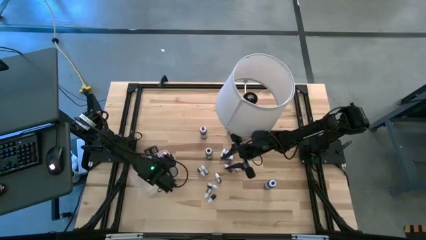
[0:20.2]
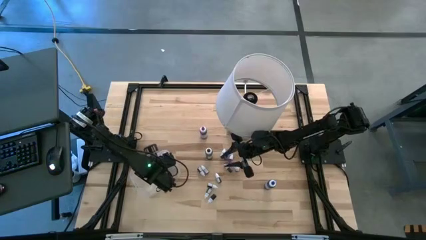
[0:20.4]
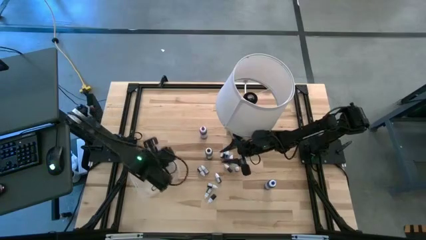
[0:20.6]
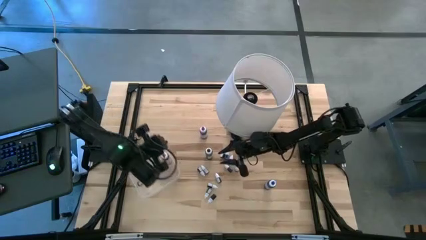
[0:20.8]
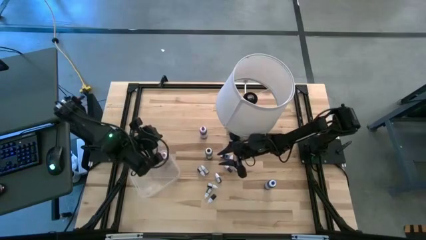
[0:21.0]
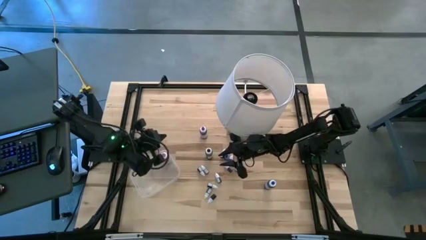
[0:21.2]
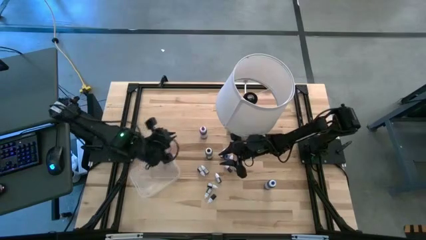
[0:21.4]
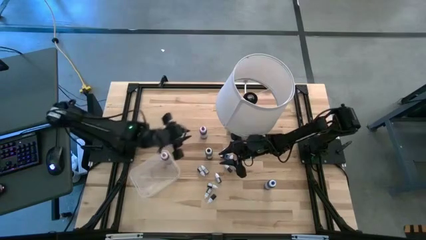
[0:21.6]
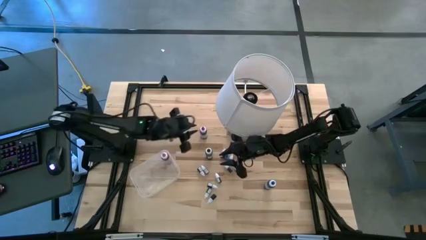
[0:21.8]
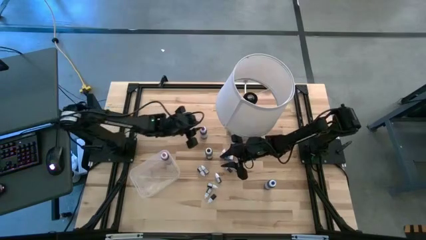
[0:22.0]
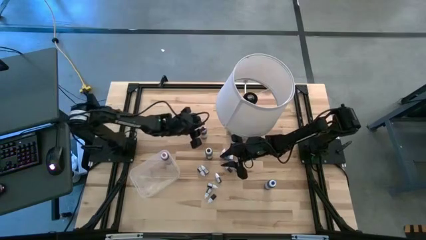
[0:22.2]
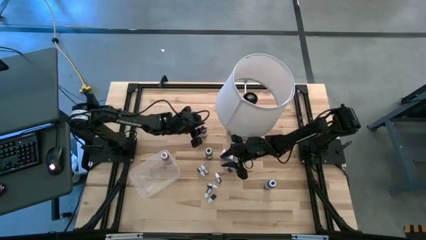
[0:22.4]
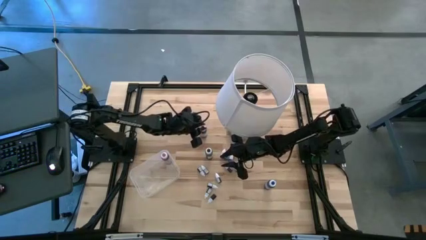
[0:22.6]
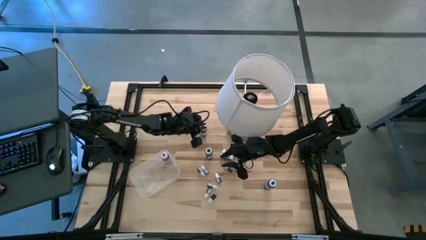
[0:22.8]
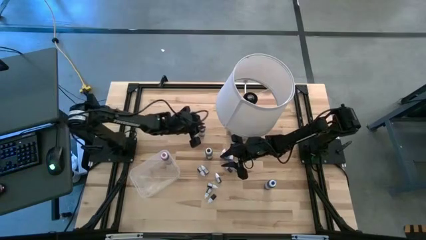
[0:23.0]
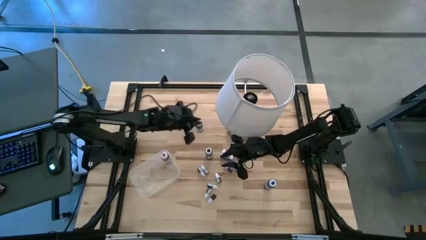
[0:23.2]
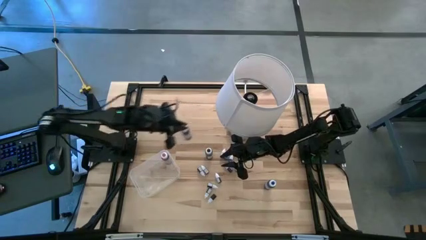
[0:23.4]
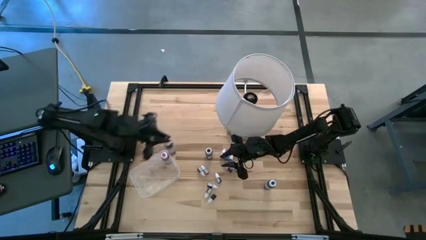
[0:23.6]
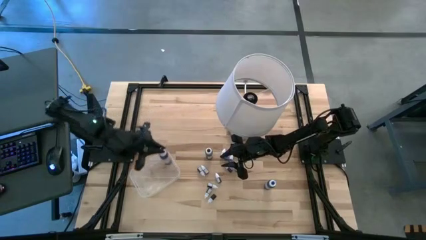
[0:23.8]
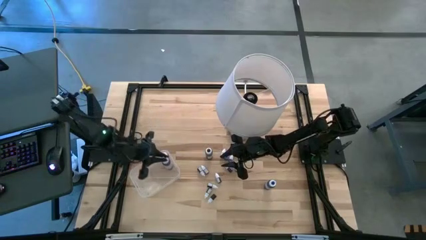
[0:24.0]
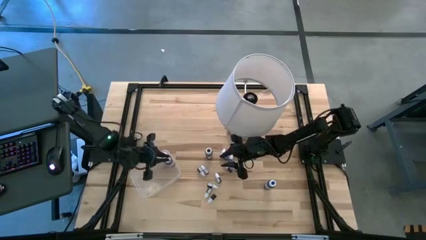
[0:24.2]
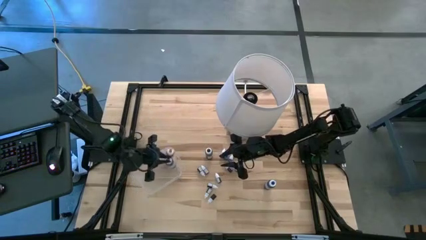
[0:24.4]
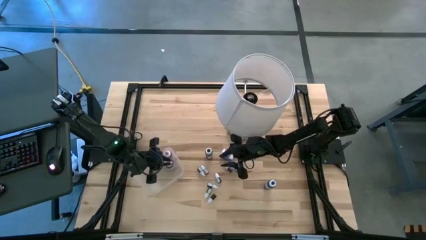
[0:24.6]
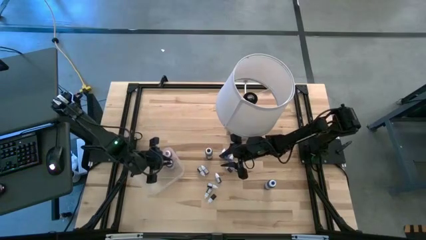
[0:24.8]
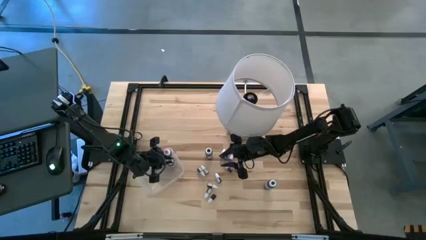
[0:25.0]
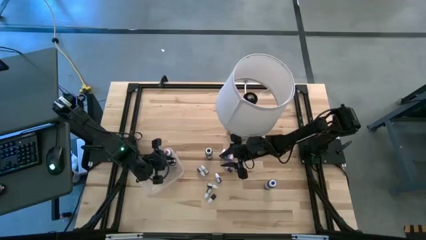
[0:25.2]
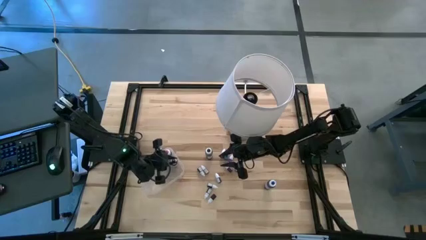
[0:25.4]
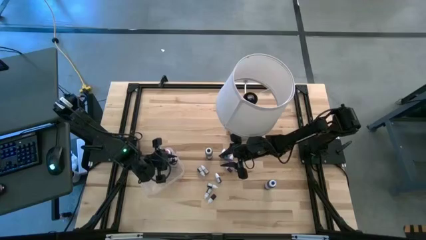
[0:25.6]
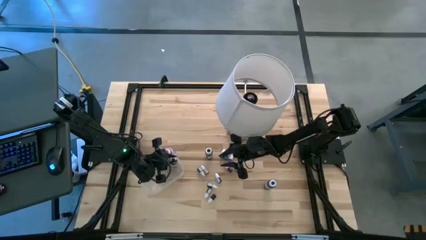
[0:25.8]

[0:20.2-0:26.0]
Task: Pick & Place food coloring
Put the violet food coloring bottle into the transparent bin

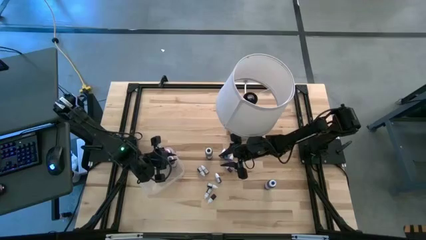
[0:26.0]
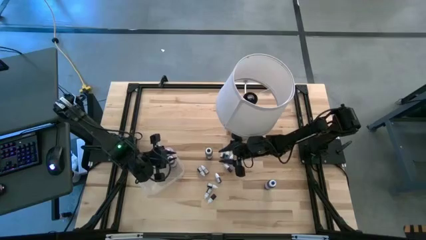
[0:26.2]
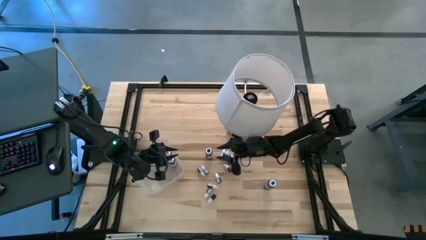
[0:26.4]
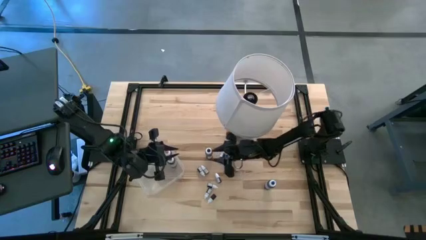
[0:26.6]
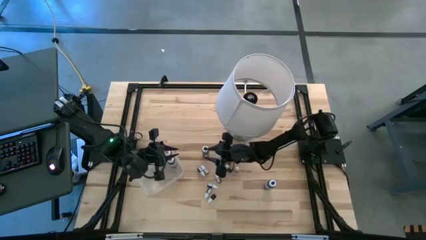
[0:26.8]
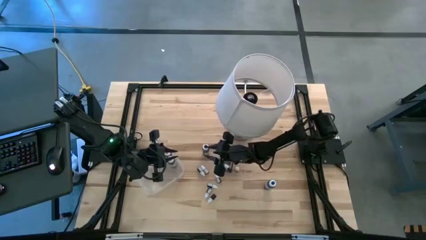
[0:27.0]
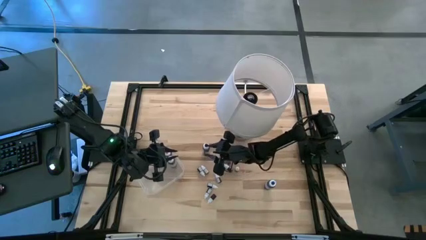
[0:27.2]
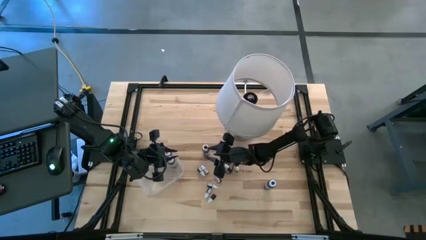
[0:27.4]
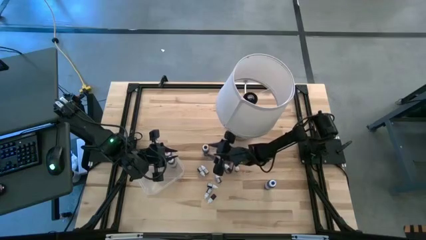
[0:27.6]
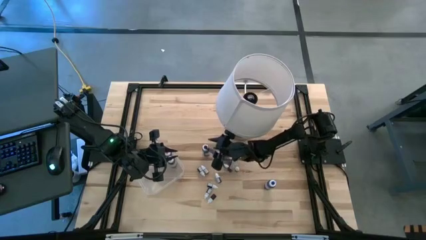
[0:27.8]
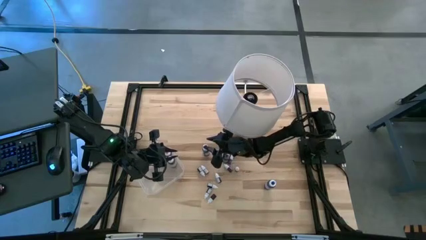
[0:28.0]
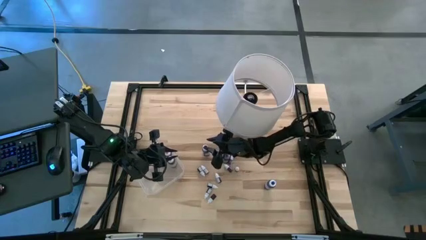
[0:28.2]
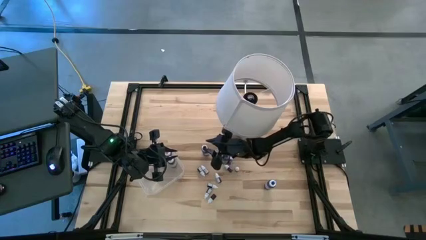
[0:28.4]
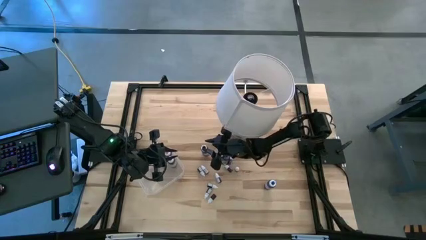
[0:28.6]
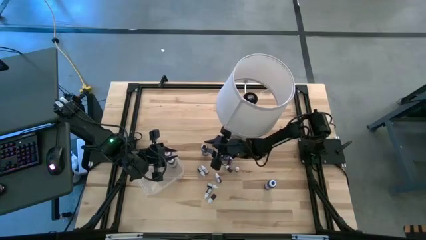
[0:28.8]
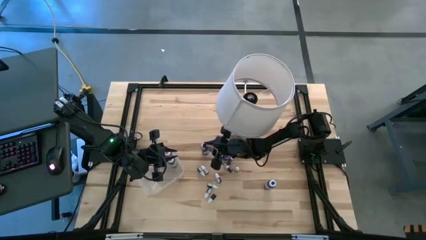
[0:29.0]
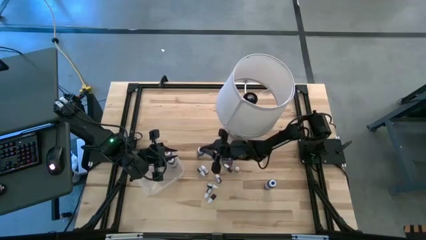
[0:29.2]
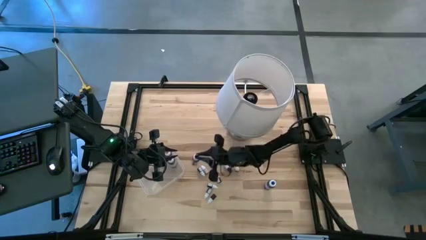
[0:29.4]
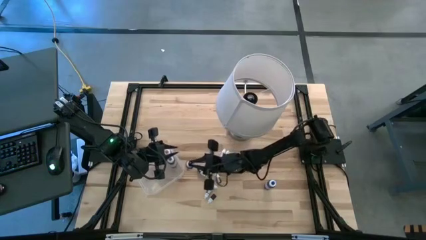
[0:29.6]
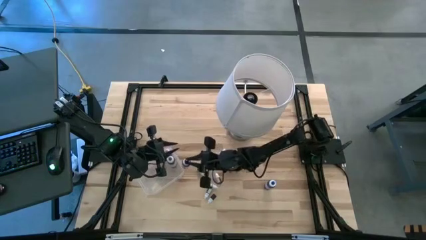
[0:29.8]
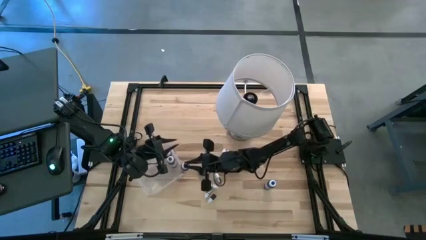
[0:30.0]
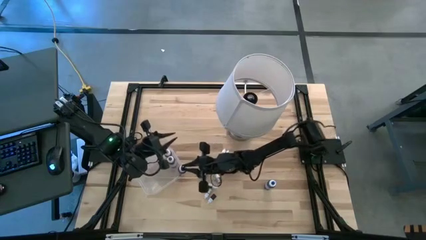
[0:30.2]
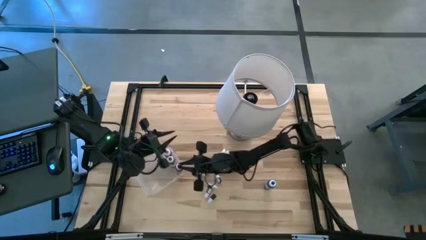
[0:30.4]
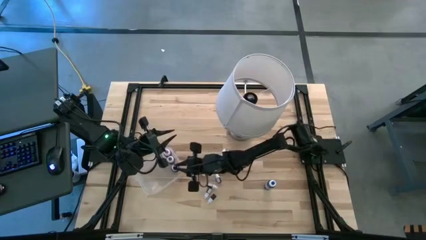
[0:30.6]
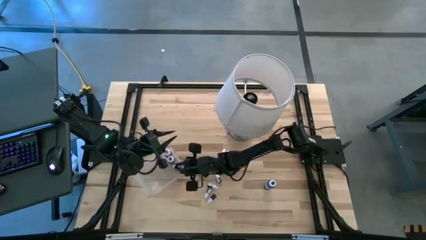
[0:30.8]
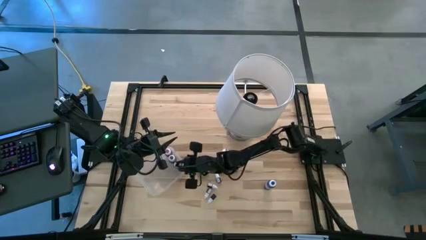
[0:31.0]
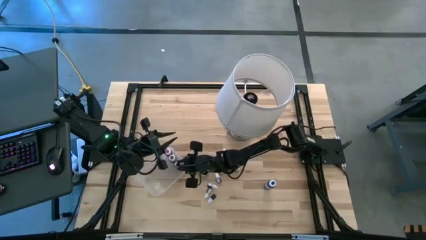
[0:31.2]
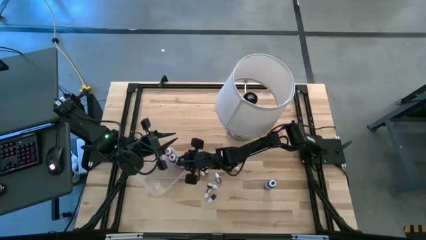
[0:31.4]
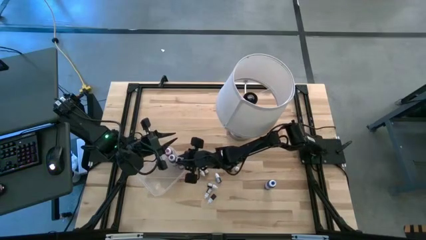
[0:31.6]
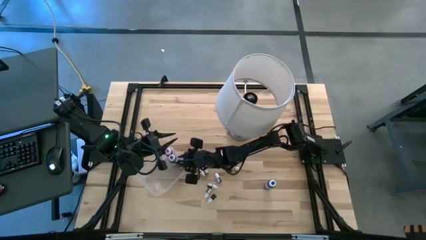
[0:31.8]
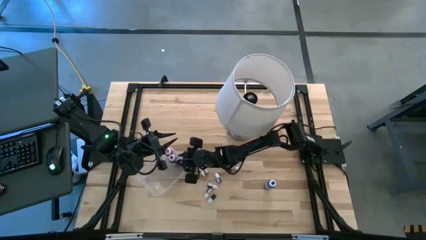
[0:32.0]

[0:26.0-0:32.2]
Put the black food coloring bottle into the transparent bin

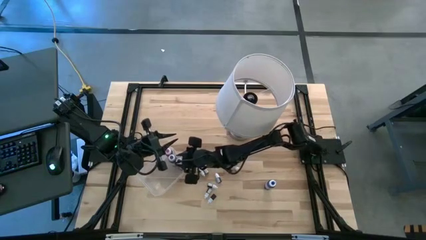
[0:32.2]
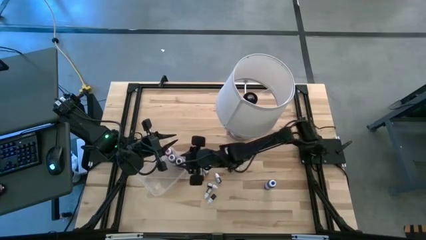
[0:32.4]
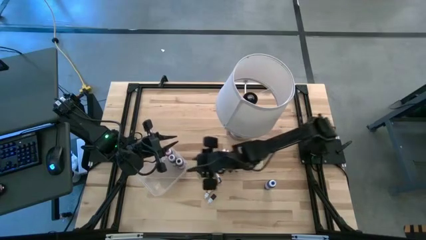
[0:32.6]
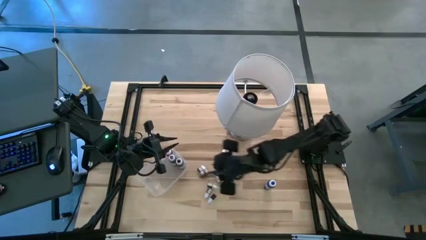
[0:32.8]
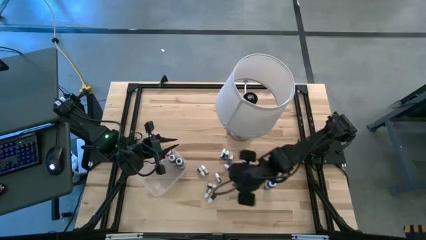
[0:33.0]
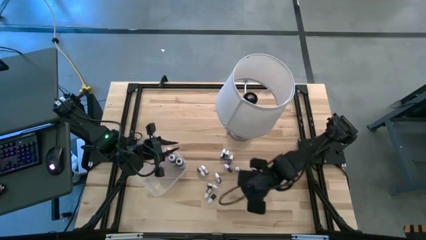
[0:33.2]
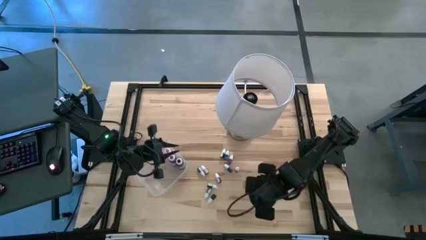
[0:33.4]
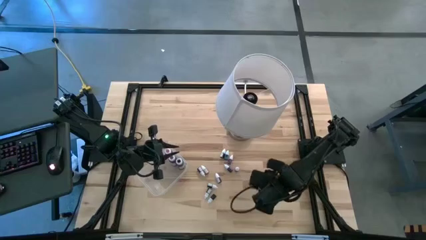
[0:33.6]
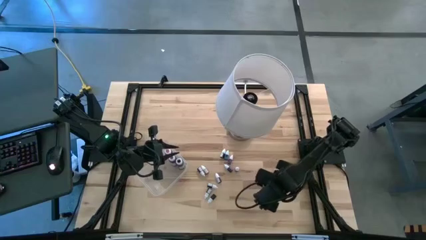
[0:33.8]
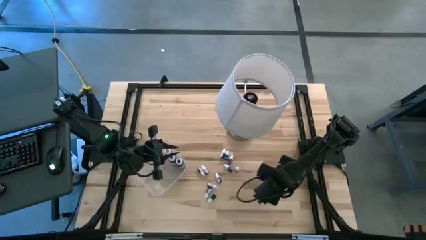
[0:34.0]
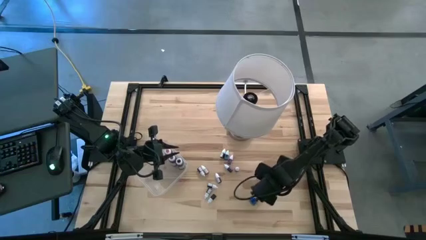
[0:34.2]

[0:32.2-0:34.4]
Put the blue food coloring bottle into the transparent bin

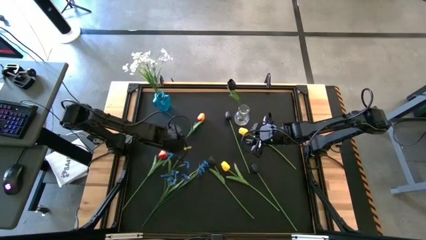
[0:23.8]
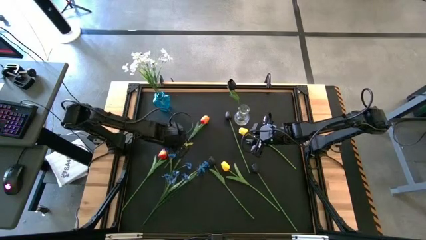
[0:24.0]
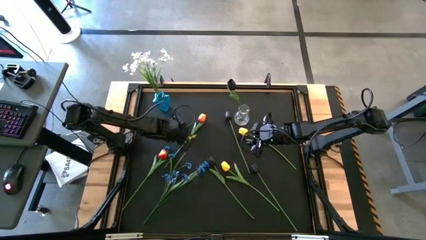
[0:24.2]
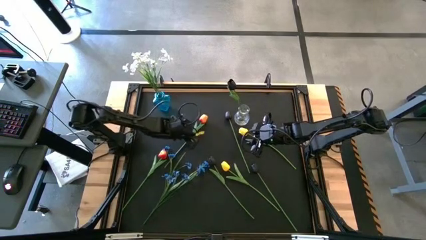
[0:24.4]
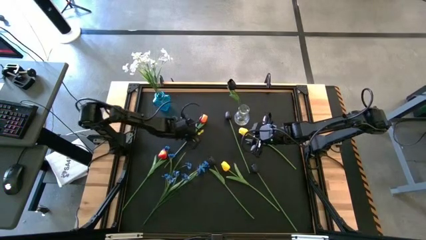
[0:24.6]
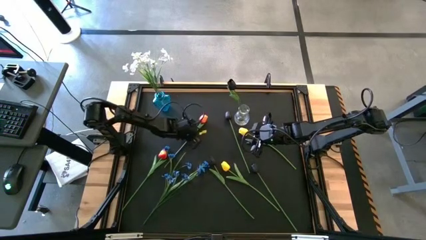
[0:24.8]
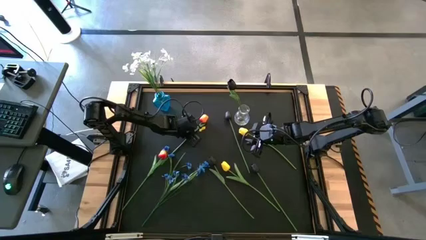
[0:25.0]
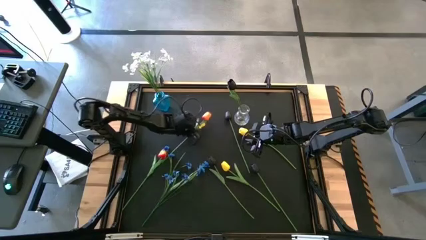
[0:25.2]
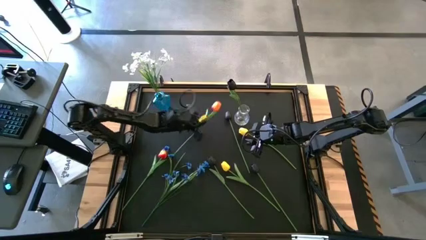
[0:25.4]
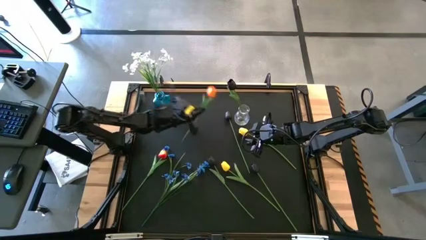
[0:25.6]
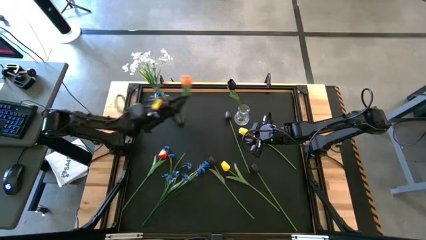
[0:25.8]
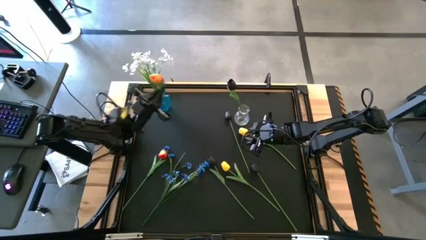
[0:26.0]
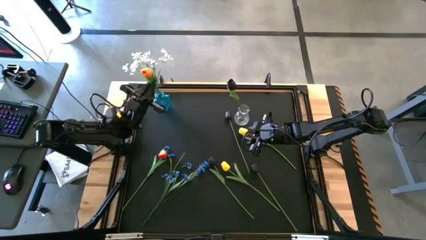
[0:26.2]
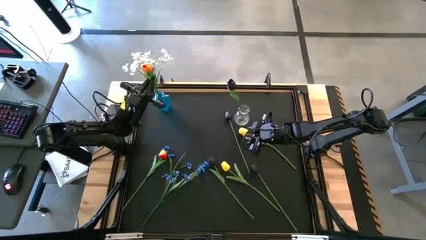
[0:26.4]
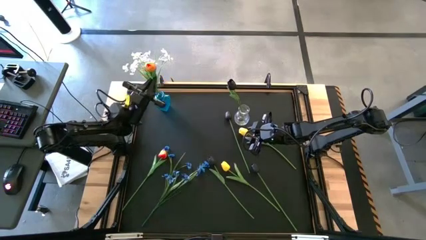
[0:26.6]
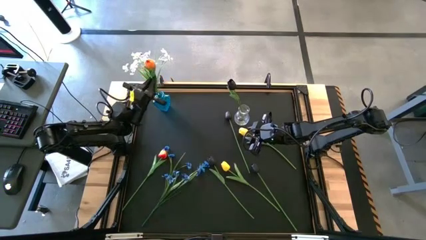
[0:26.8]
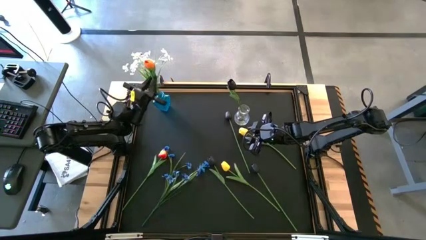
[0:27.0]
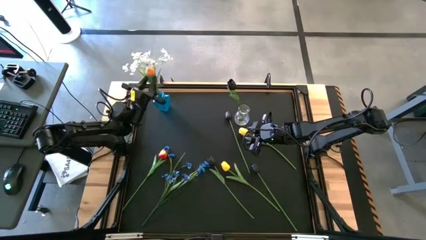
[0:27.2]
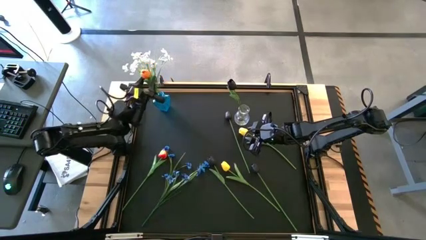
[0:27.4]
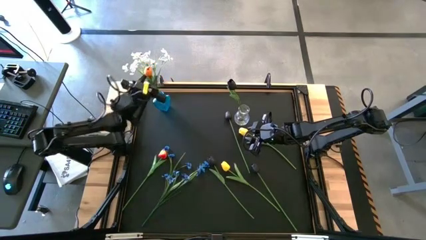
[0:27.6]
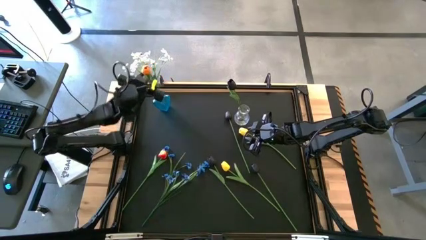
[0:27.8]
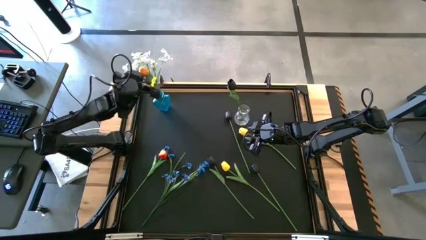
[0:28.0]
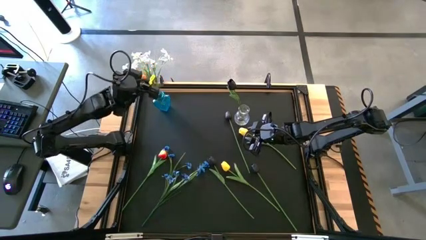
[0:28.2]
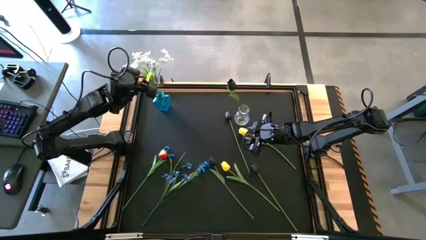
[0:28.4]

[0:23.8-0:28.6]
Task: Sort flowers into vase by color
Put the top orange flower into the blue vase
